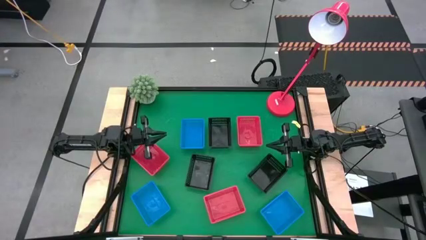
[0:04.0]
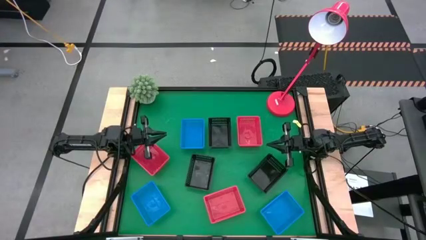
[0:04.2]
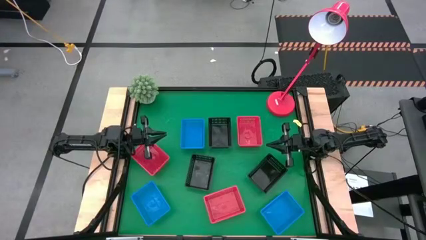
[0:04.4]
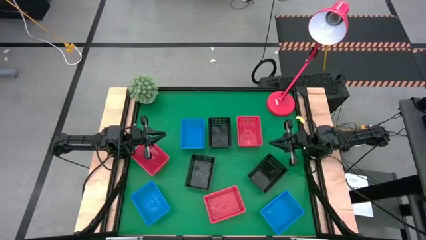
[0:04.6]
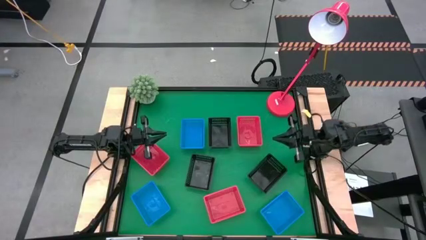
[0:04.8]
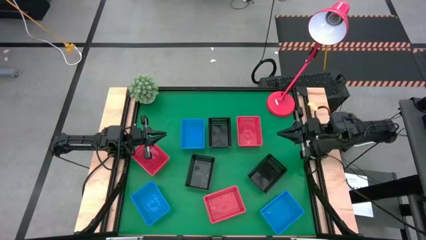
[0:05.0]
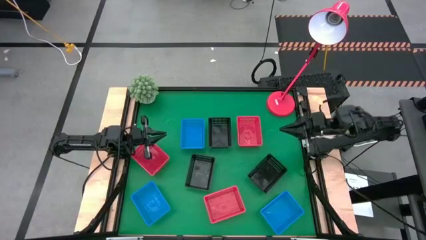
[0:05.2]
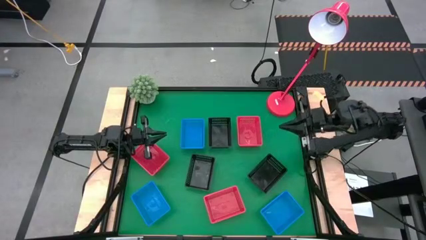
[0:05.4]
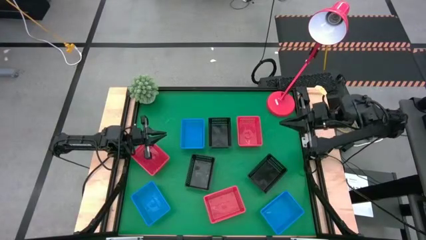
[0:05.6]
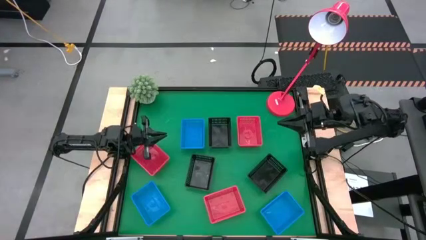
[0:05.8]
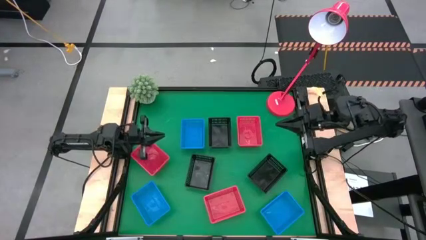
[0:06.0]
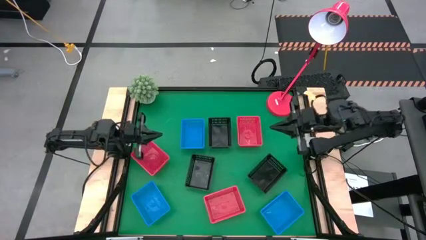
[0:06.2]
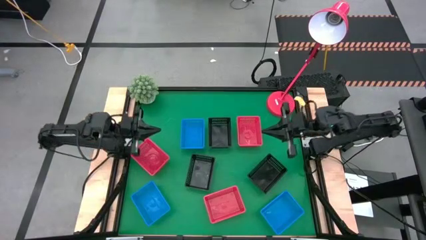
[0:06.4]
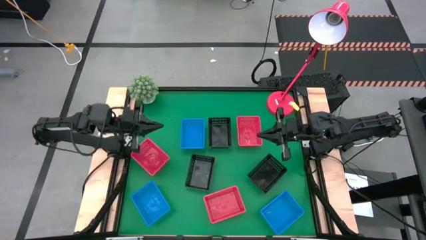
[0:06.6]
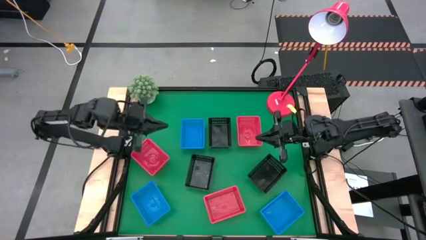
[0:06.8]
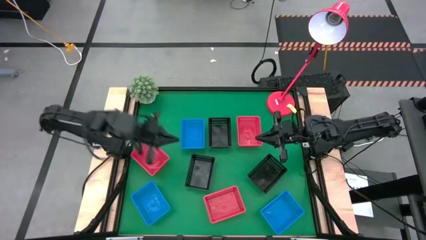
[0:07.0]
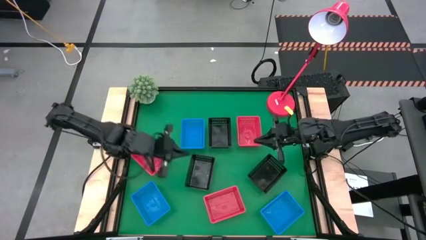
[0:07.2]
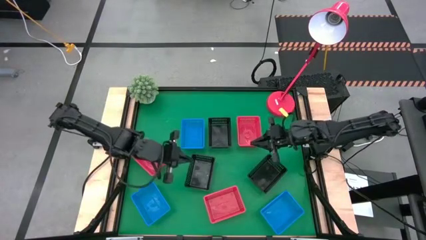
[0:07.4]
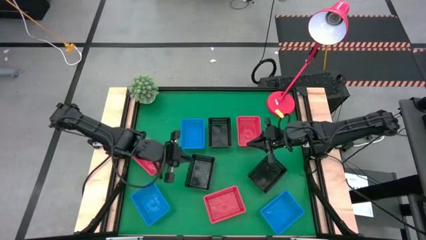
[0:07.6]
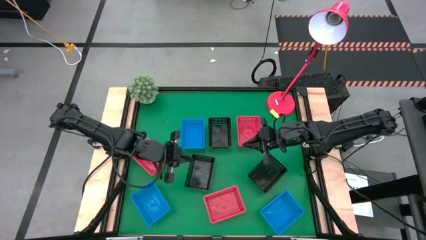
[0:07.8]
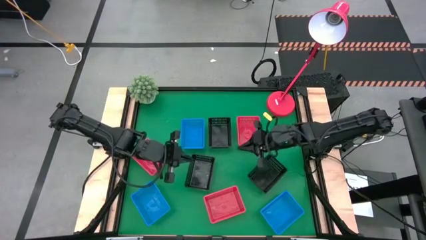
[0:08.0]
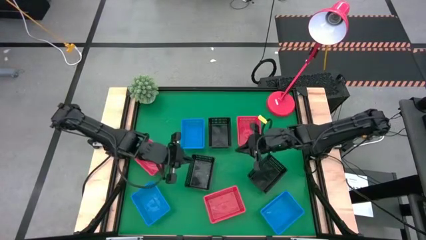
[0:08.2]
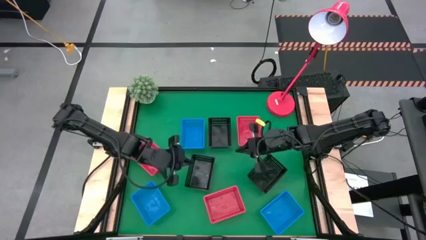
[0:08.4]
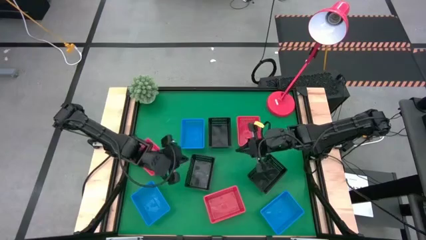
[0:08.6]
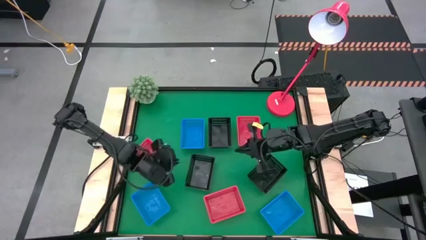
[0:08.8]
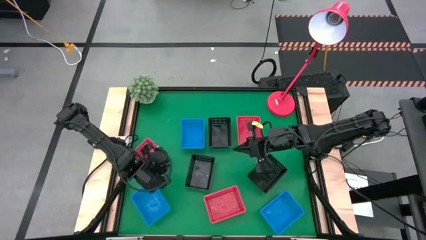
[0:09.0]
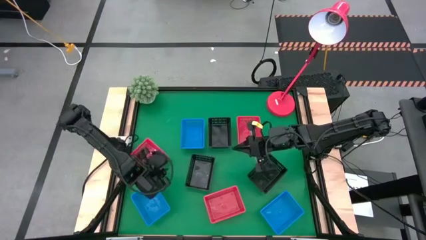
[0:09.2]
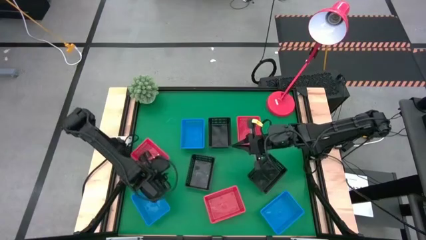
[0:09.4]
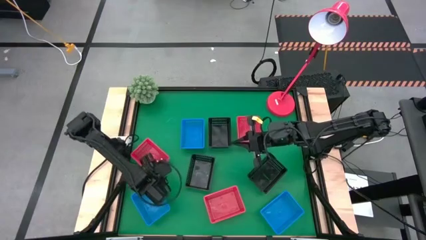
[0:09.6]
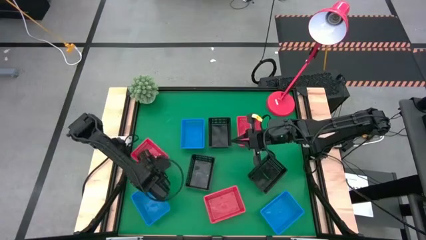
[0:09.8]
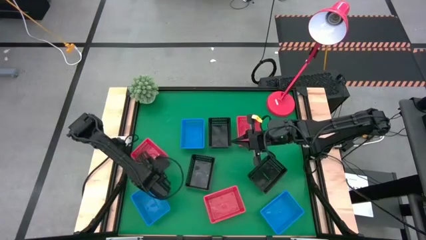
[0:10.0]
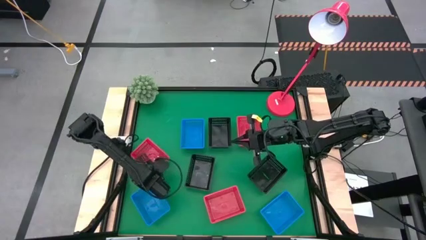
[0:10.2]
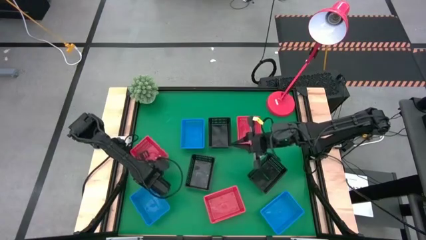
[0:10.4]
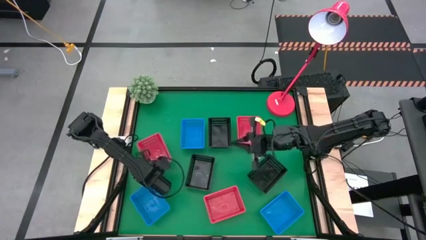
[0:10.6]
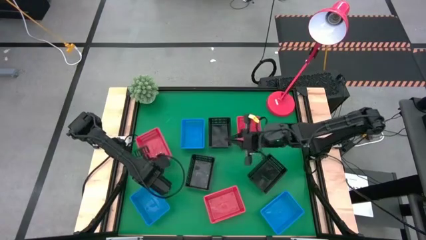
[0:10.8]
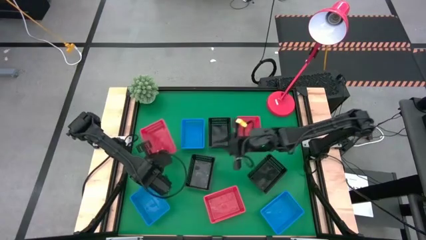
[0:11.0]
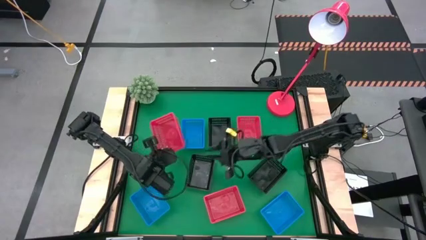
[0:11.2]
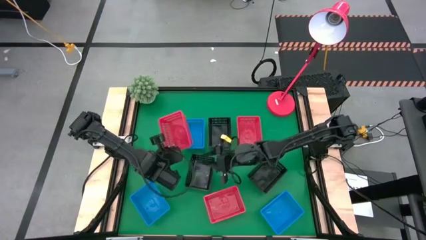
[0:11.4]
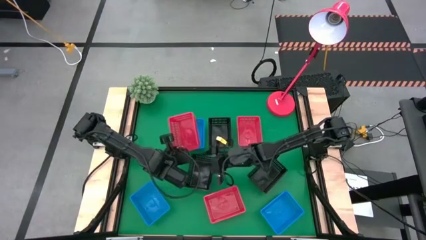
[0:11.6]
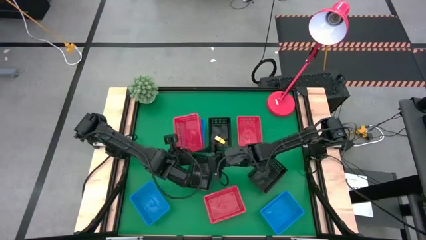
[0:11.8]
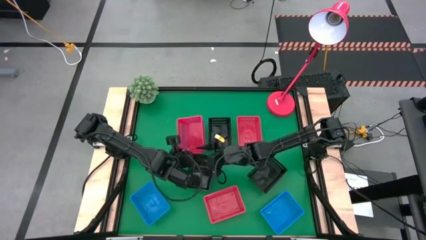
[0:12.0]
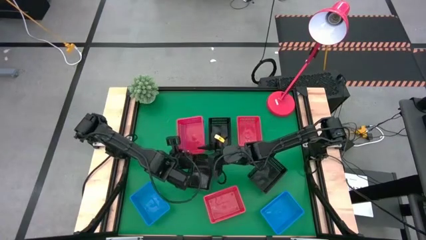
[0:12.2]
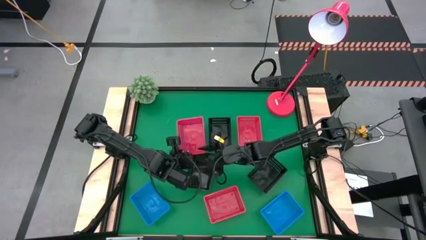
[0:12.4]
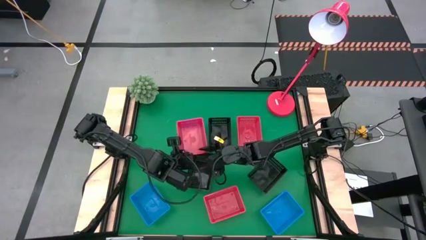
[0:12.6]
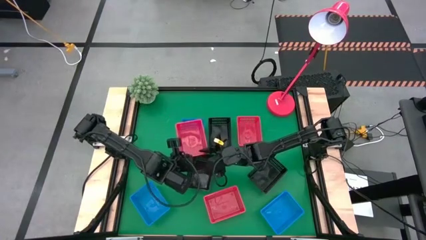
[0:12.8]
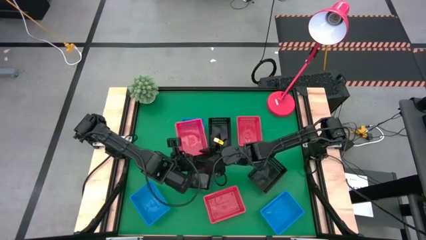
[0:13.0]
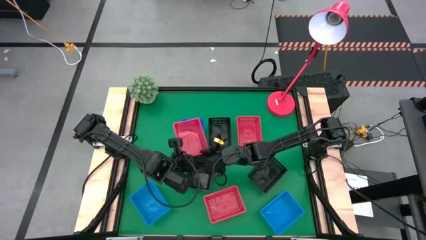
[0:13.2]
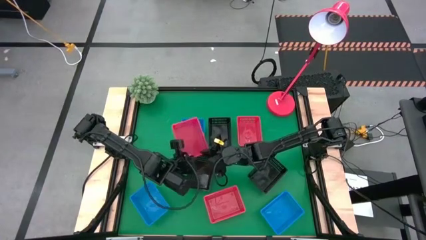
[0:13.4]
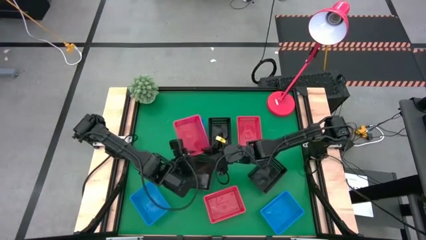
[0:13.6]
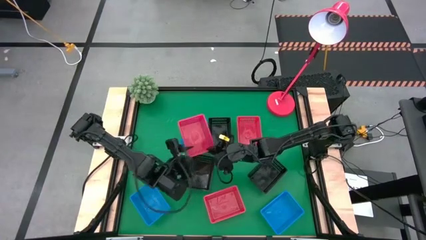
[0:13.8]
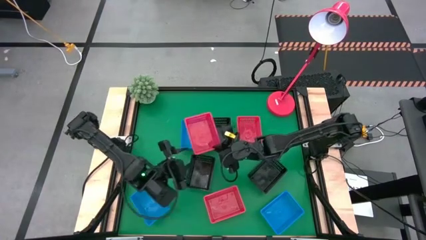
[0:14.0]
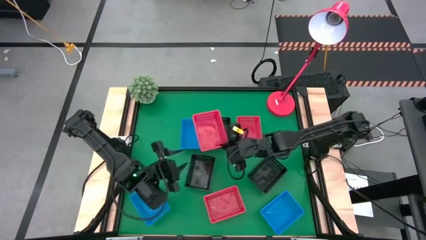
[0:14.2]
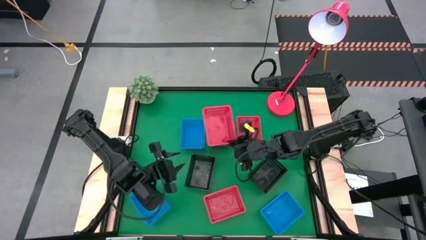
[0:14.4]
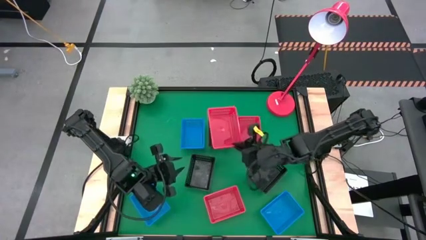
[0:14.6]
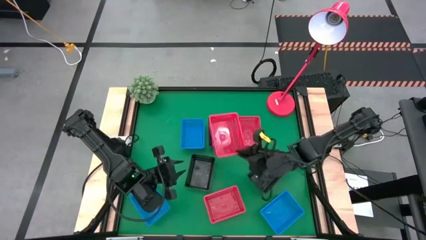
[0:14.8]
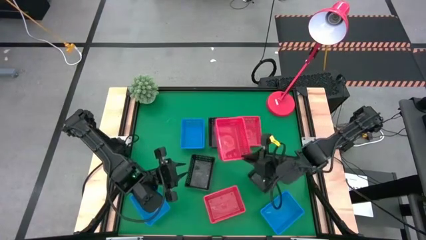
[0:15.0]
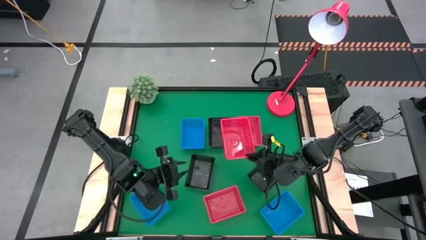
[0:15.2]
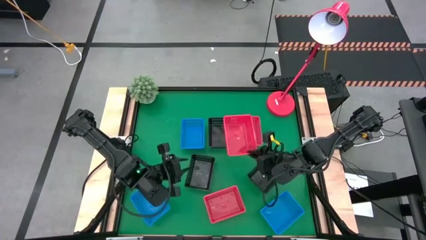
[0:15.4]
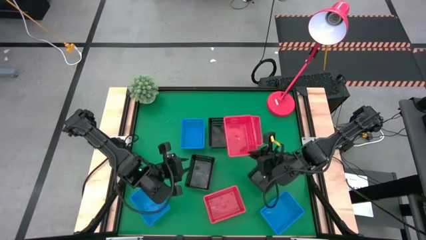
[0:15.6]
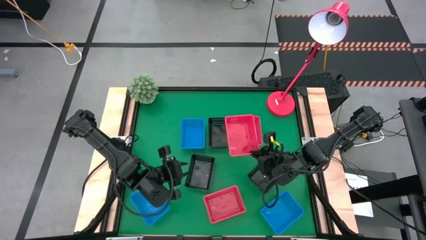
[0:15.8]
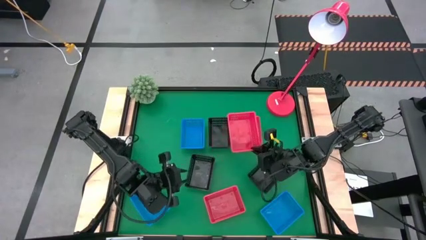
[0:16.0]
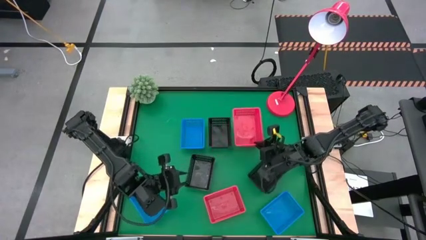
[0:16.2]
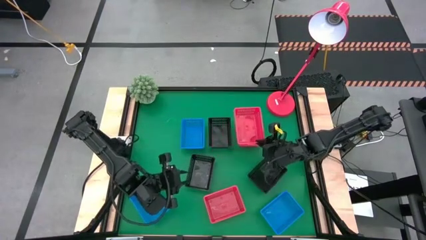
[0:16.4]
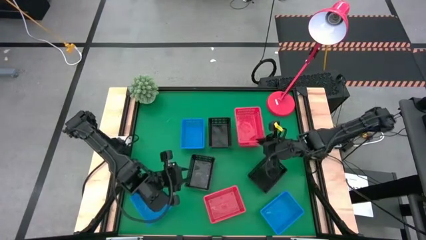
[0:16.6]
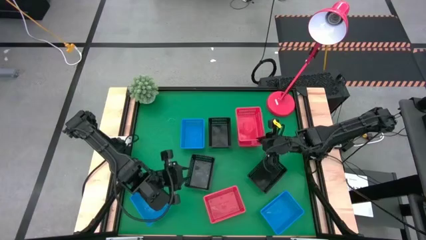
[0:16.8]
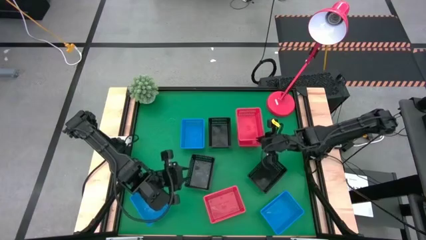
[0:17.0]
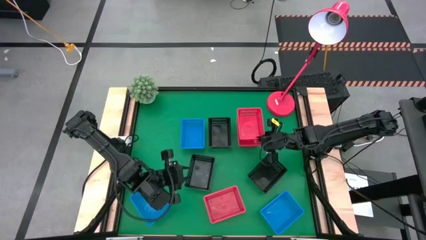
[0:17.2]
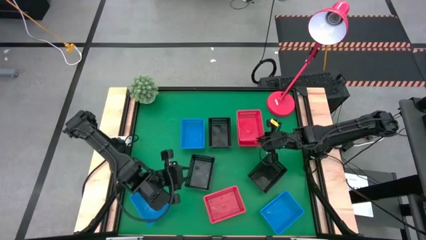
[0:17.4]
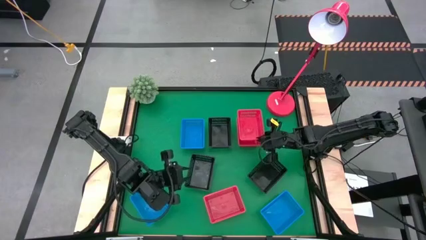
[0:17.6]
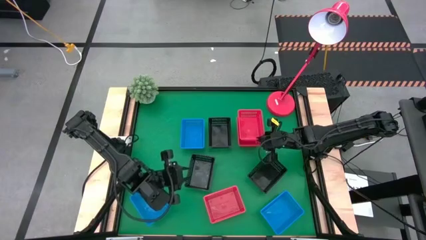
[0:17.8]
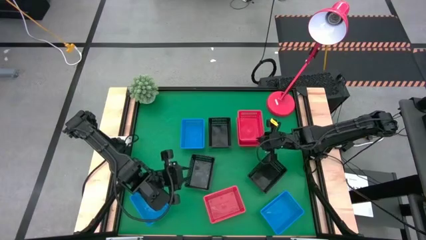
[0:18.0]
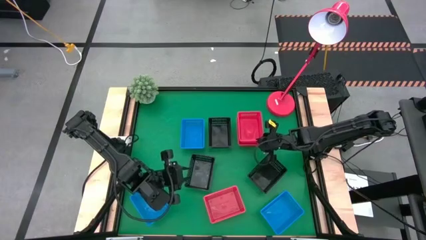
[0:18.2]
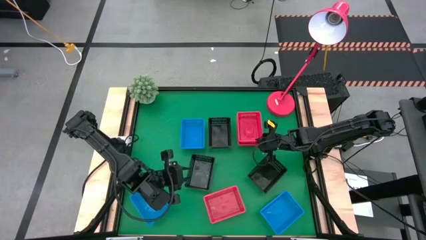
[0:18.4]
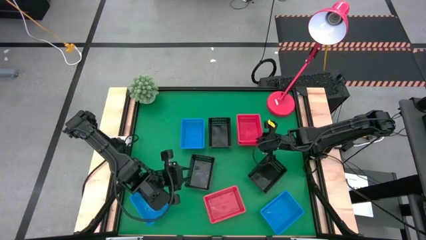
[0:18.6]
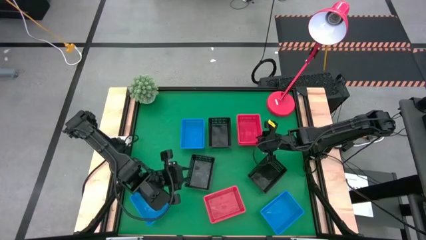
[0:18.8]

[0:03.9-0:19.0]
Stack the top left red bin on top of the top right red bin
